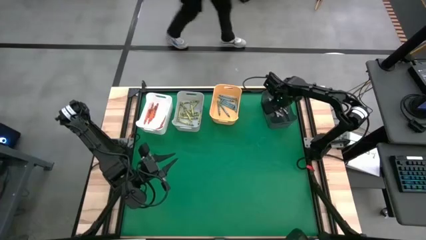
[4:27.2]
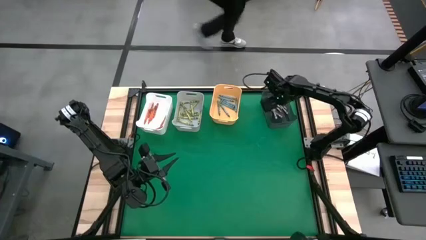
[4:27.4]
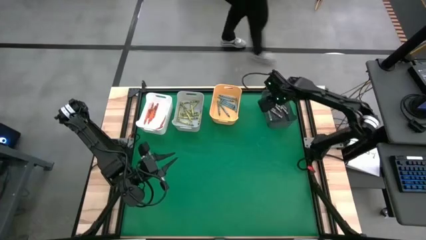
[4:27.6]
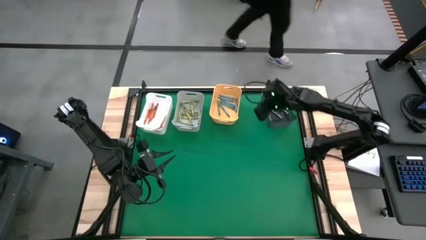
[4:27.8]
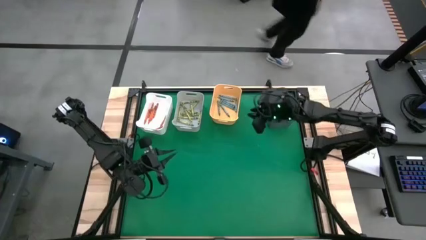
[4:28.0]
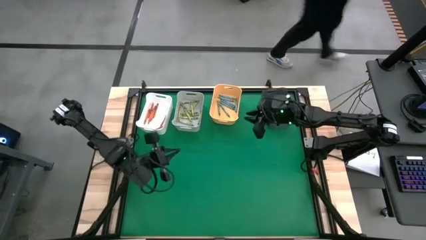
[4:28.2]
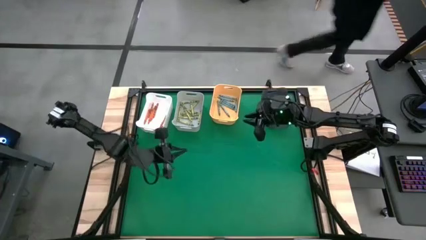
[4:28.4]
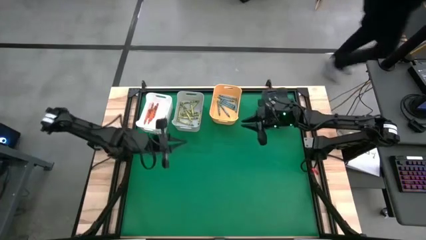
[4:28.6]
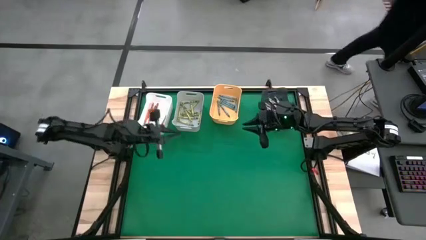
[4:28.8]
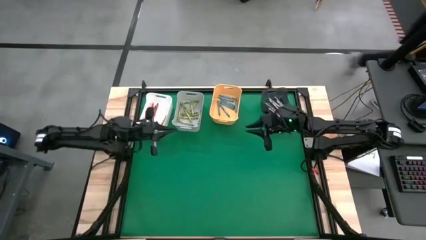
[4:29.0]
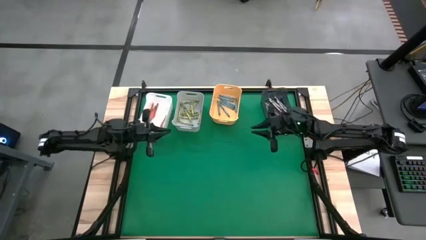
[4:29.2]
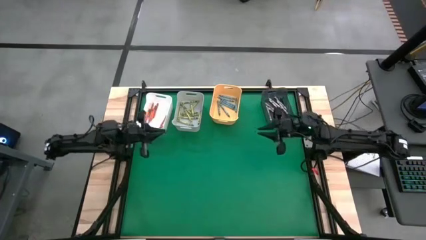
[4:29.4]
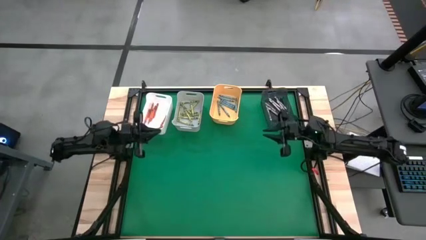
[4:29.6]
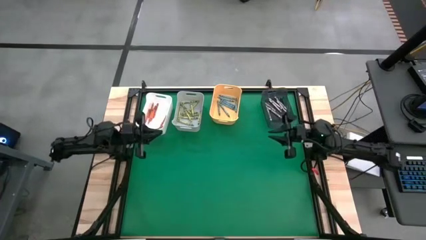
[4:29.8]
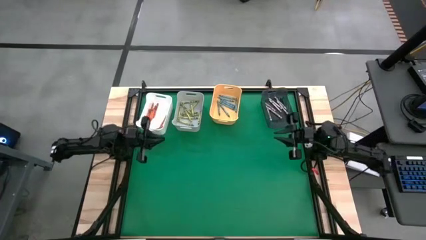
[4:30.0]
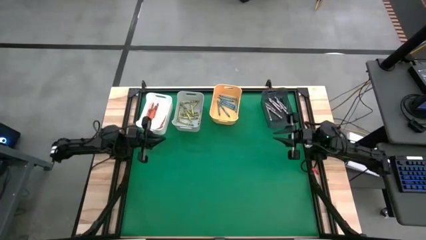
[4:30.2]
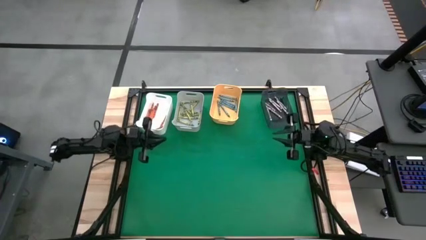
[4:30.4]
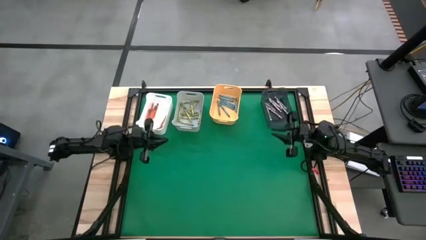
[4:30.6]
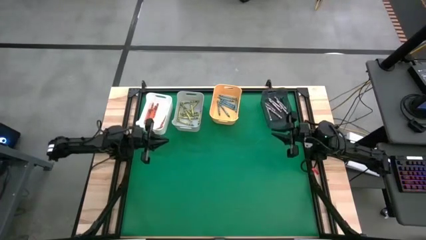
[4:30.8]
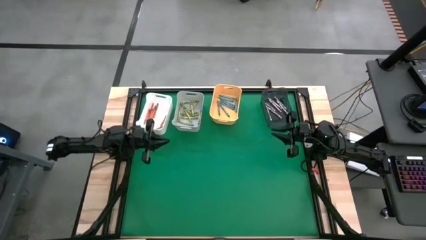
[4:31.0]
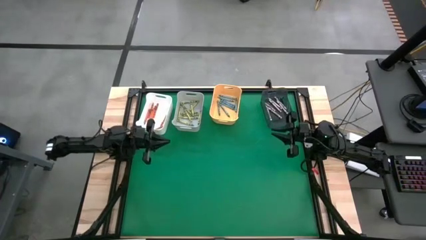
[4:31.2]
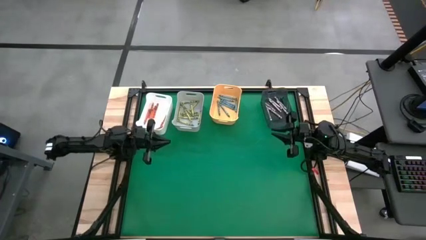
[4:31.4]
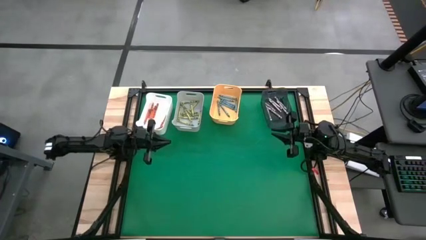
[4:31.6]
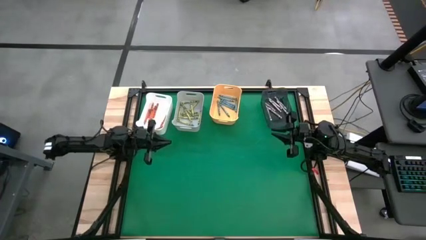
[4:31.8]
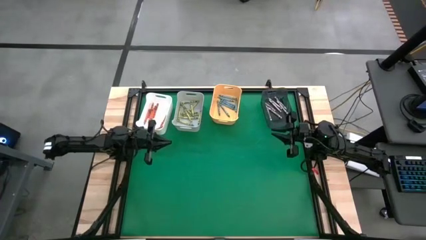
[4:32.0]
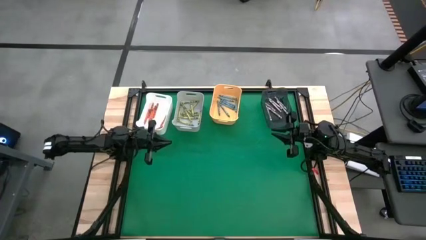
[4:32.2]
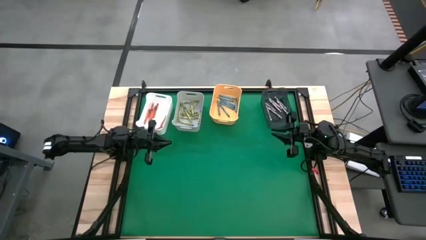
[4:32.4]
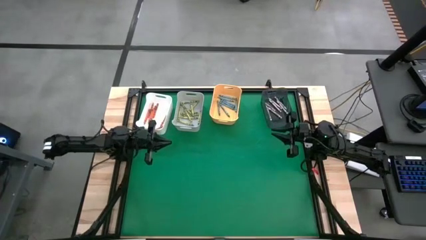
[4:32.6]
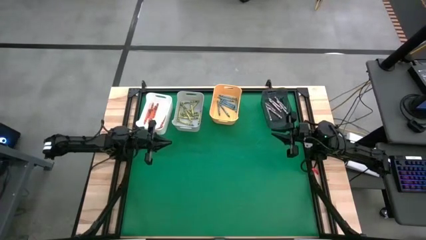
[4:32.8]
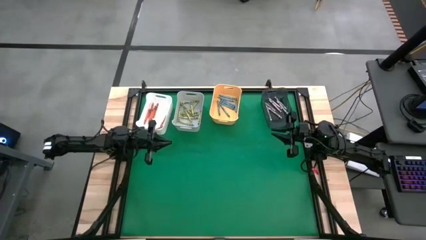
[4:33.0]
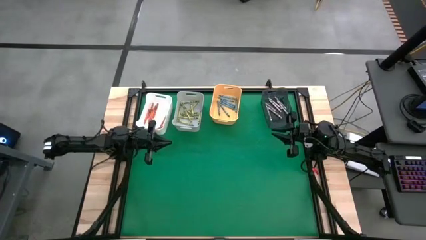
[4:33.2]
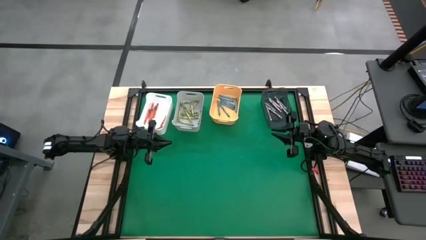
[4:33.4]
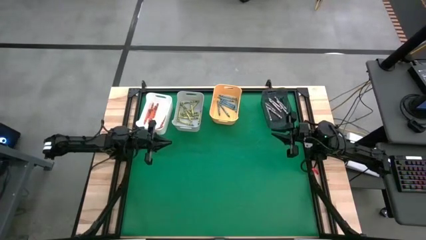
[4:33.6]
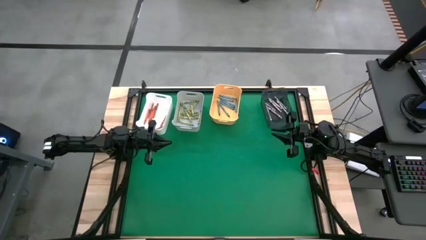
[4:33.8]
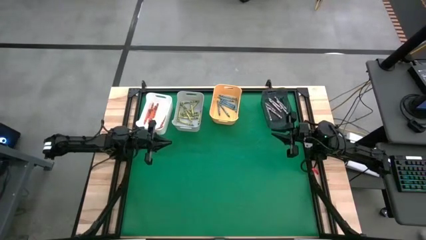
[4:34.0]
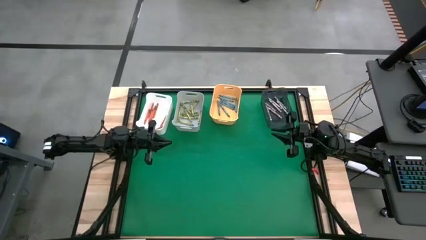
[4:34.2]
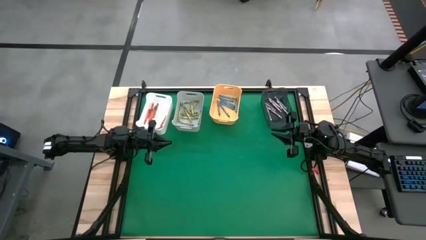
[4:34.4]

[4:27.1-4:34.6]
Task: Sort crayons
Return to Home Position

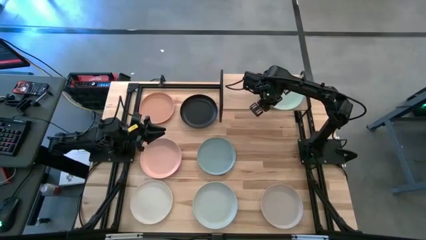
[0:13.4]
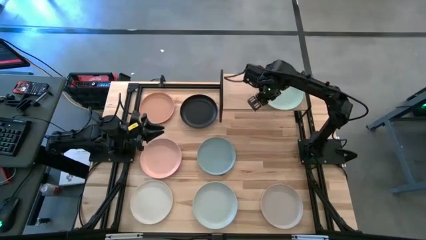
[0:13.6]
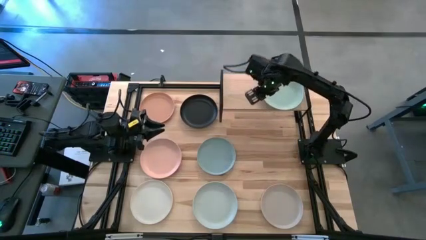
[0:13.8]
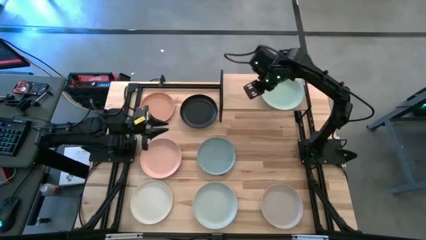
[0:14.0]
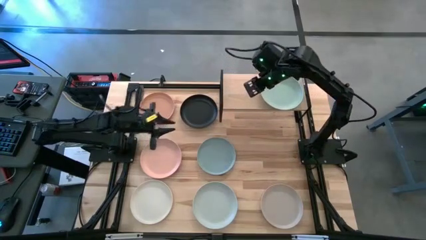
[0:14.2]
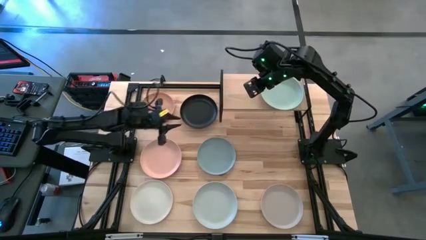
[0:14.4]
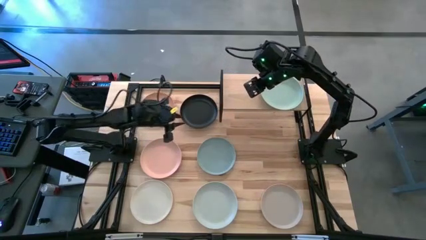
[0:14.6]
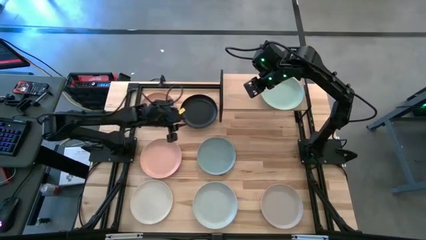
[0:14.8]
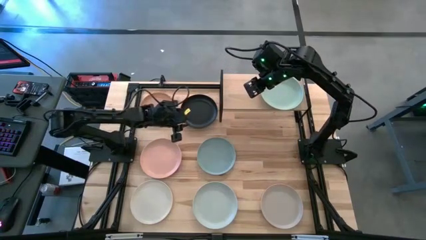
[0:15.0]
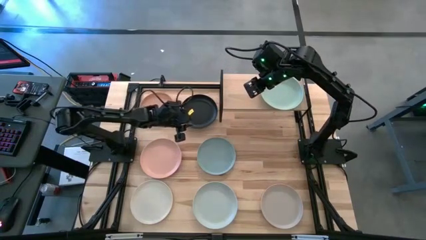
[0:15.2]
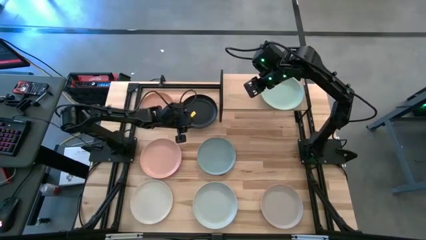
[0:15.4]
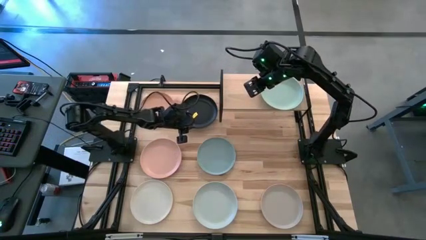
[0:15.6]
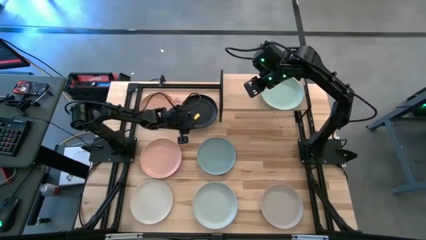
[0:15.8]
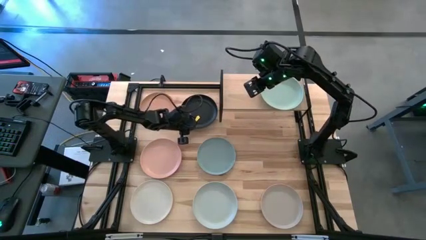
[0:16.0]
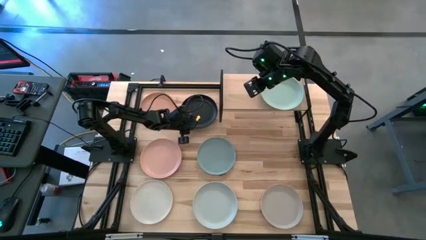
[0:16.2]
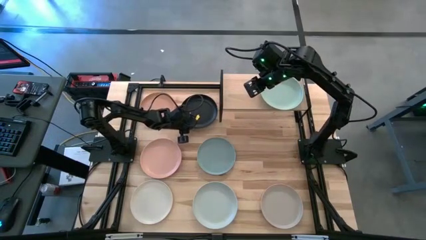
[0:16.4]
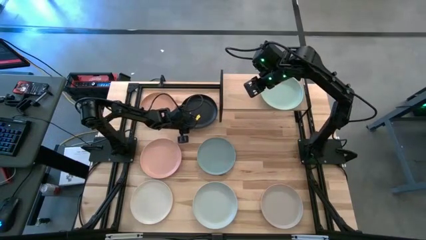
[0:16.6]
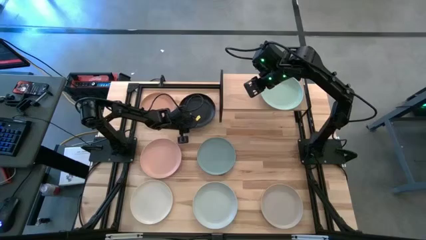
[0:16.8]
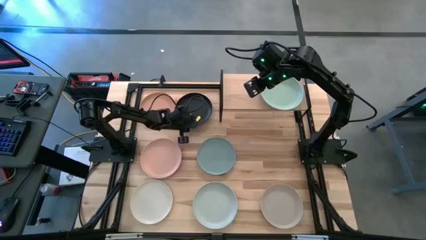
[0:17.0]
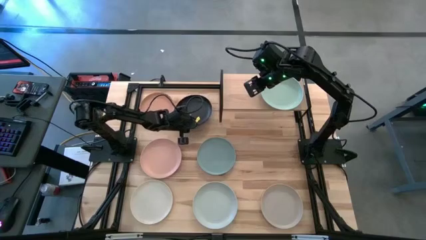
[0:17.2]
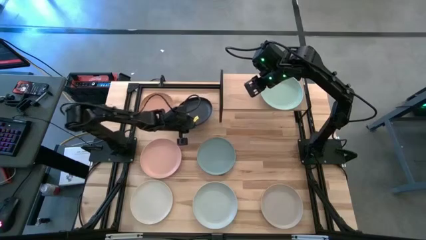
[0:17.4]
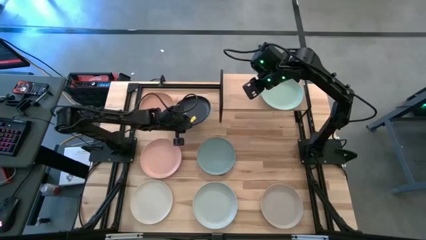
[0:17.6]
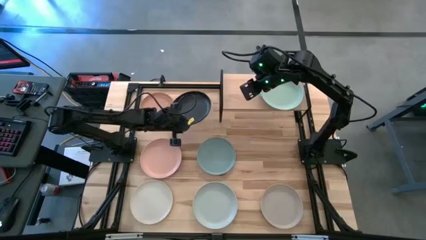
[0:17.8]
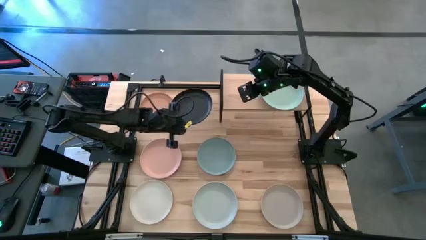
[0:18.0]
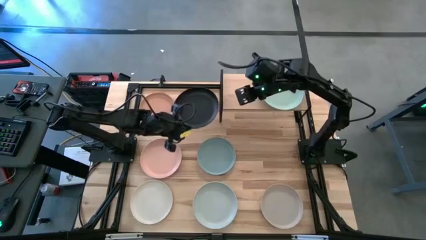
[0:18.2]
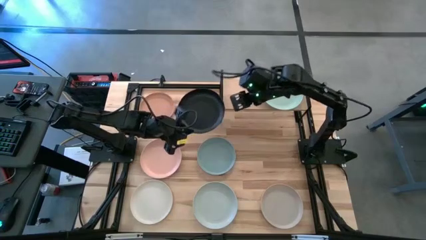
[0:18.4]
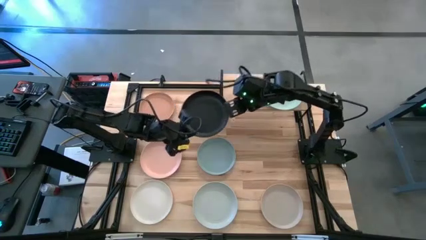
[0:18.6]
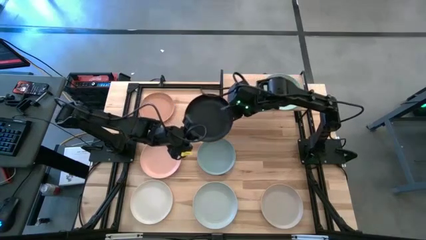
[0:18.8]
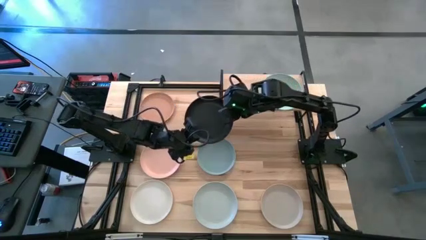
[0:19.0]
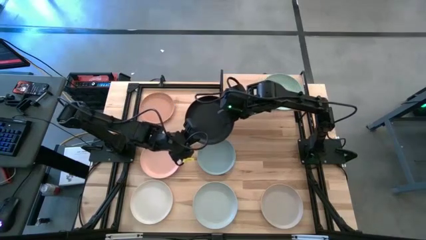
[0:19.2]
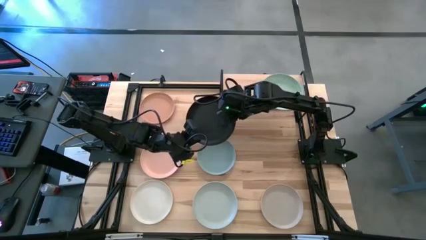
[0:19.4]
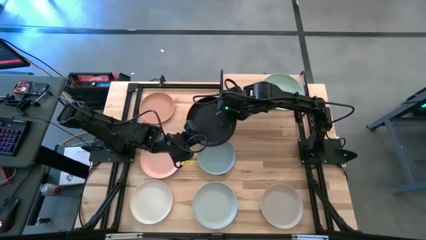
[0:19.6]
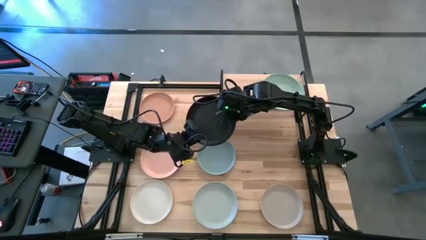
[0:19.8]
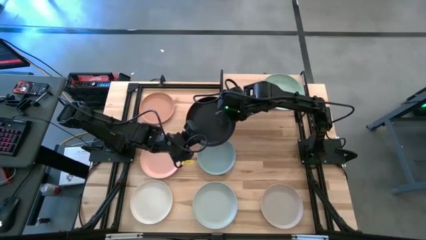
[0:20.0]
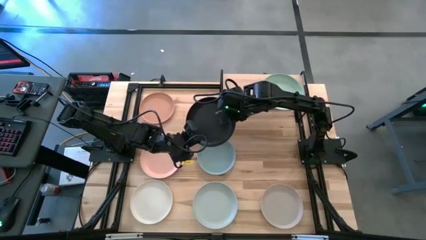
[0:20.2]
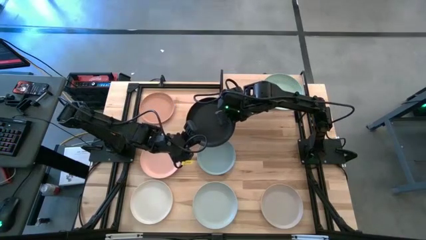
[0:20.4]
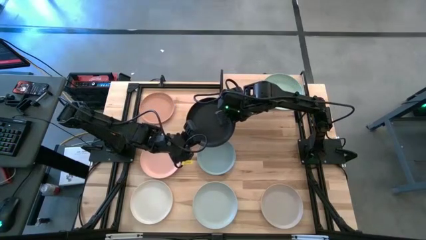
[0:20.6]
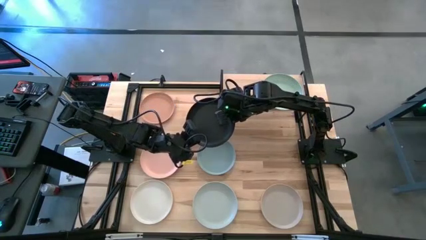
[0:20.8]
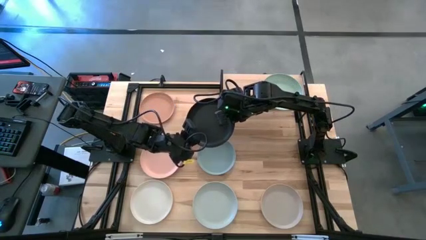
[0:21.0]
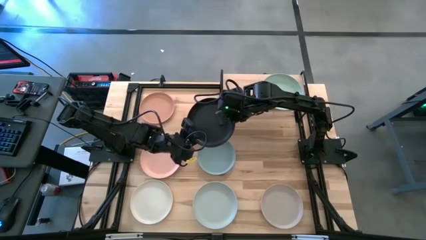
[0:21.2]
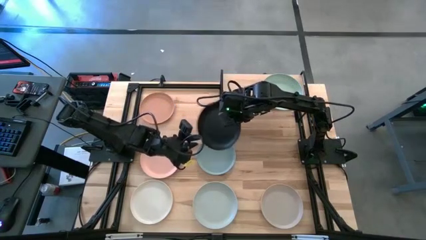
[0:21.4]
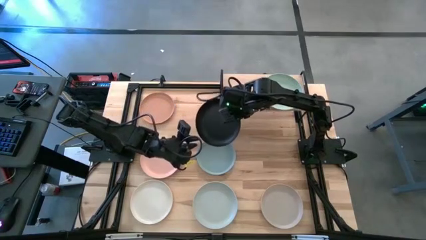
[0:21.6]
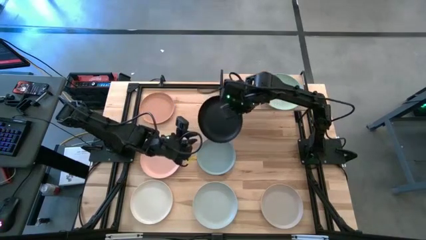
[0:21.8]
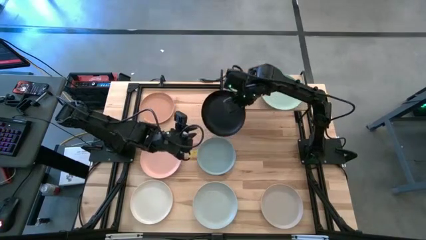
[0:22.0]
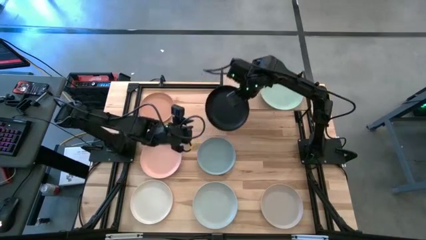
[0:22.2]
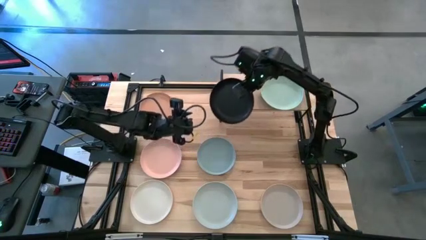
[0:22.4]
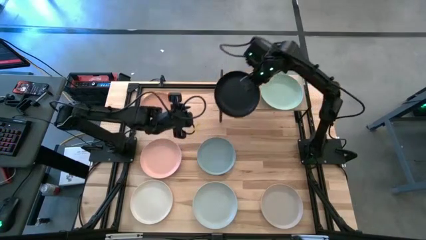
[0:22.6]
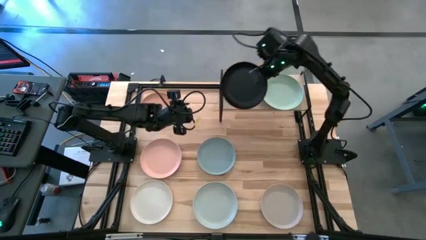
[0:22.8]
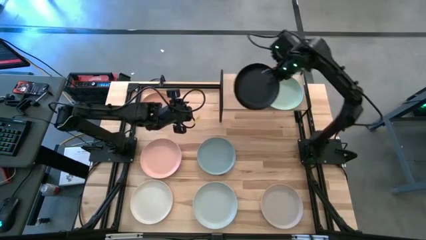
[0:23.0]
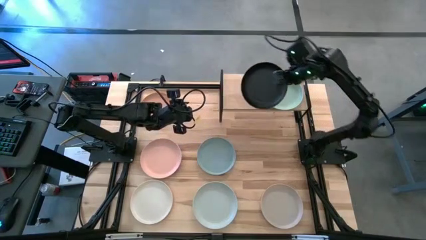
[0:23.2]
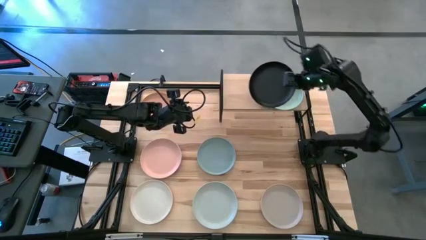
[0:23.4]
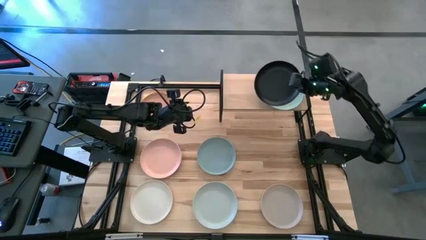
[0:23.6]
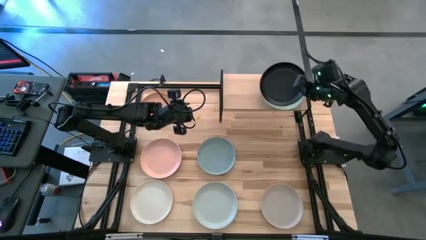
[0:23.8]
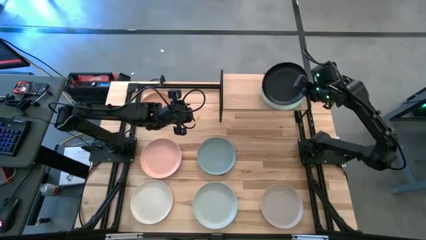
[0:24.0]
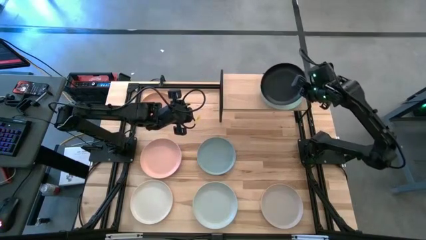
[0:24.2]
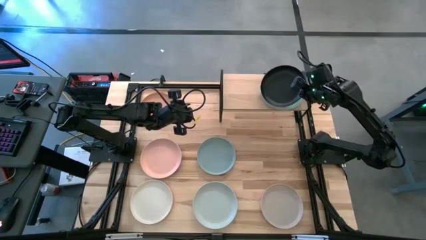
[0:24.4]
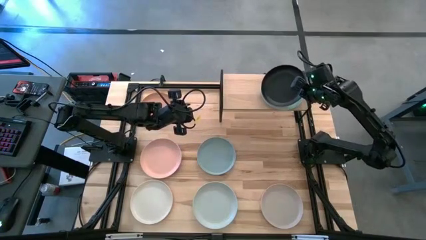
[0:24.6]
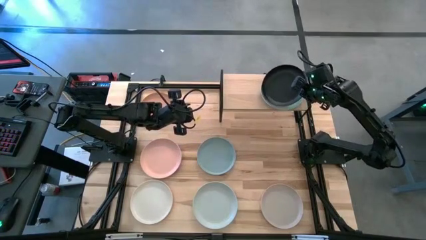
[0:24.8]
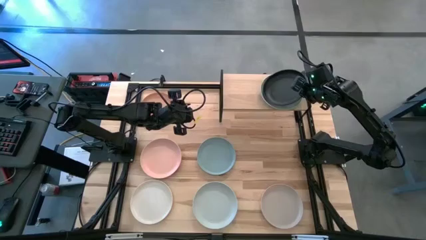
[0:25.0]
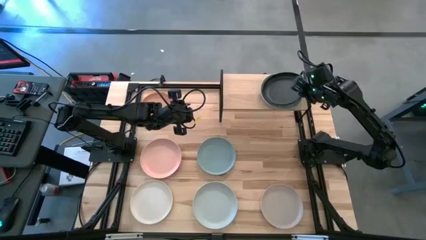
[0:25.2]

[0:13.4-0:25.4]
Task: Place and stack plates onto a shelf
Stack the black plate on top of the light green plate on the shelf
